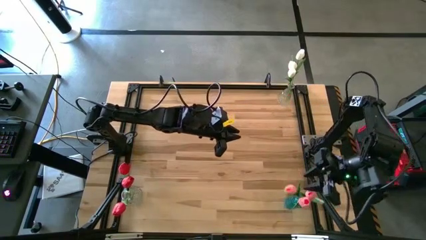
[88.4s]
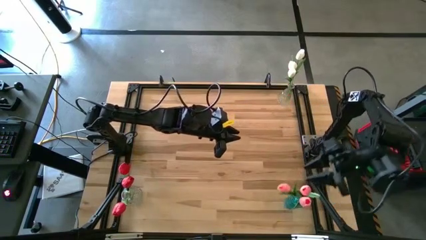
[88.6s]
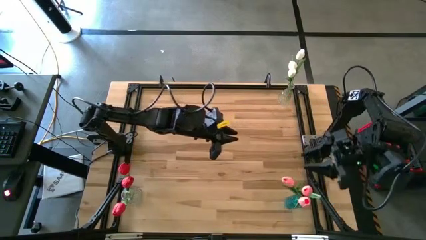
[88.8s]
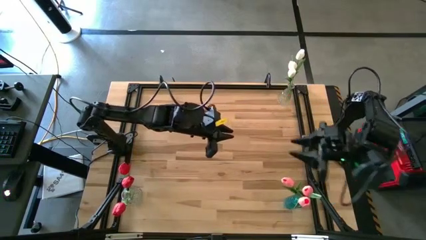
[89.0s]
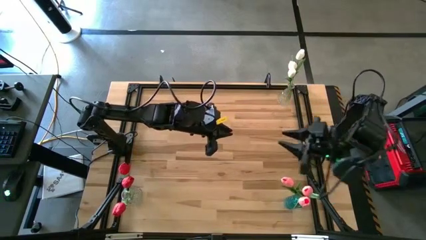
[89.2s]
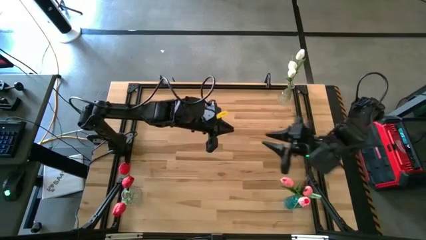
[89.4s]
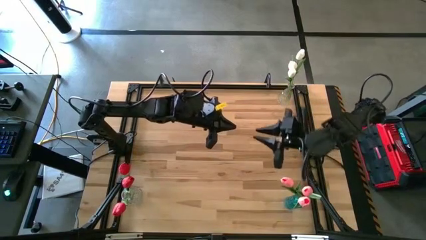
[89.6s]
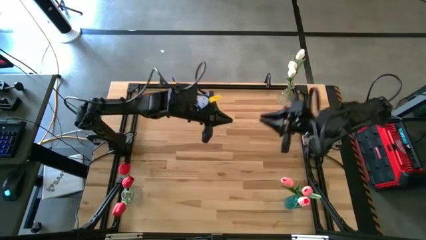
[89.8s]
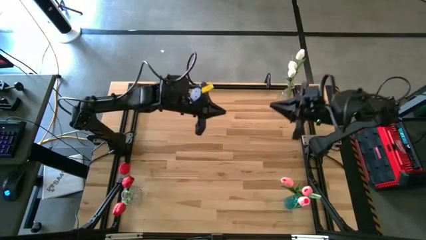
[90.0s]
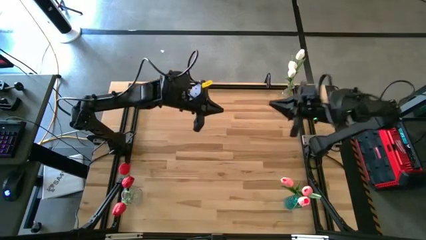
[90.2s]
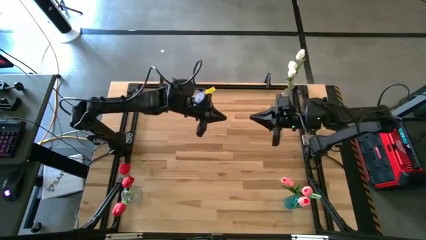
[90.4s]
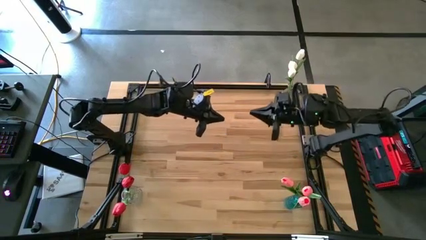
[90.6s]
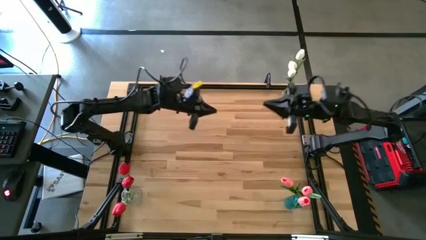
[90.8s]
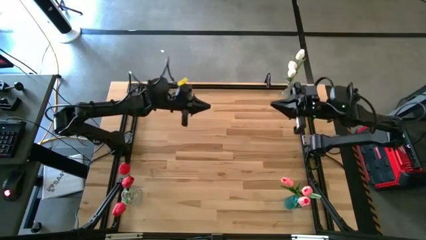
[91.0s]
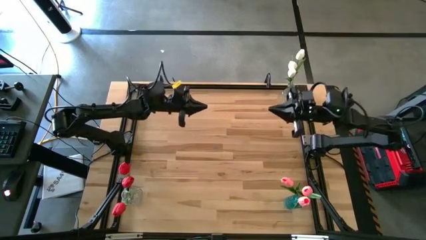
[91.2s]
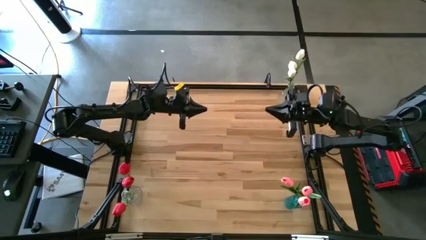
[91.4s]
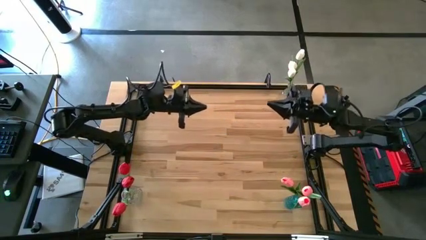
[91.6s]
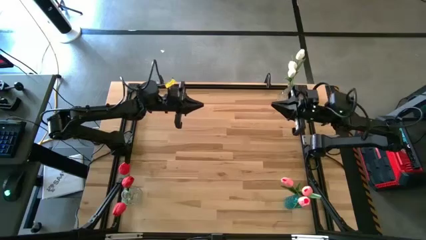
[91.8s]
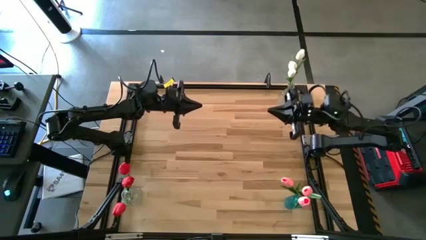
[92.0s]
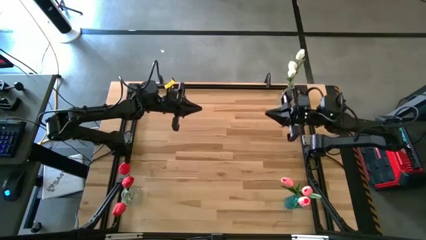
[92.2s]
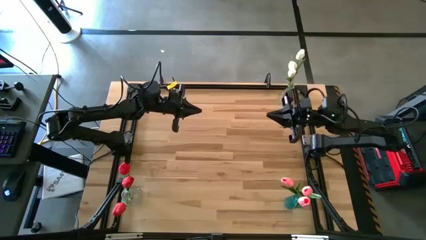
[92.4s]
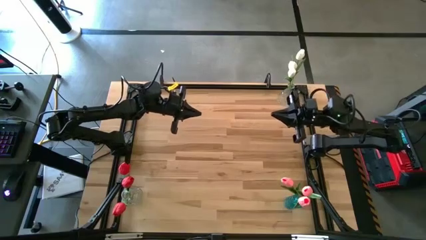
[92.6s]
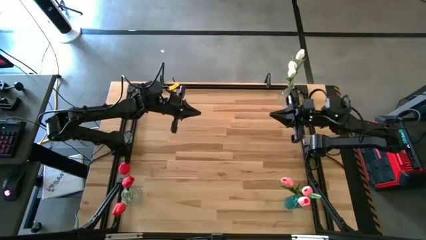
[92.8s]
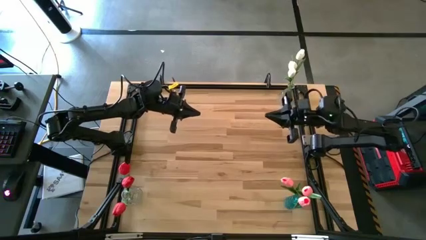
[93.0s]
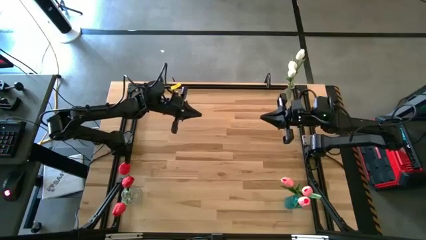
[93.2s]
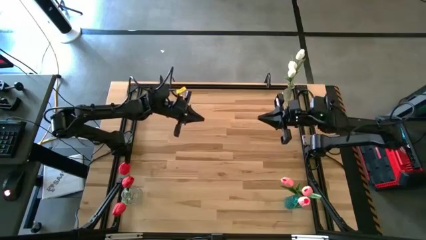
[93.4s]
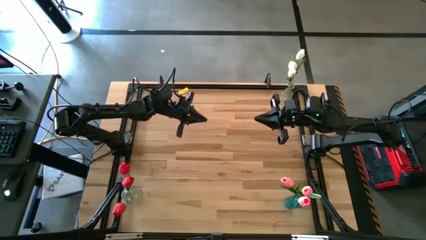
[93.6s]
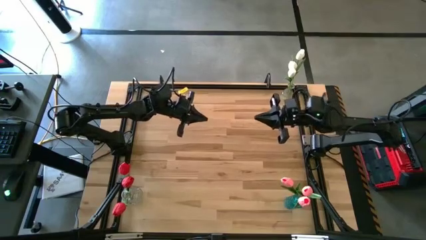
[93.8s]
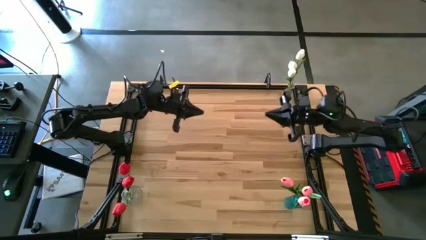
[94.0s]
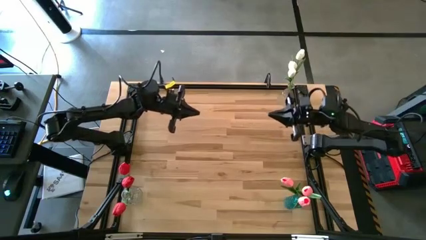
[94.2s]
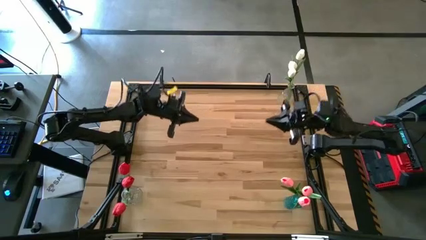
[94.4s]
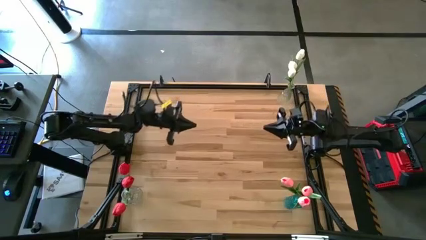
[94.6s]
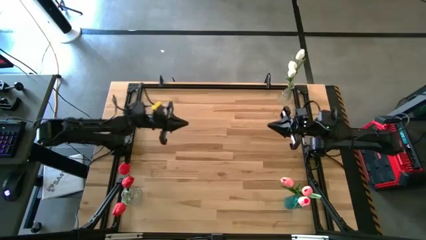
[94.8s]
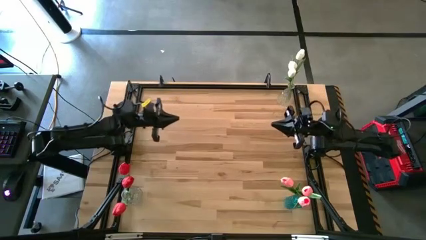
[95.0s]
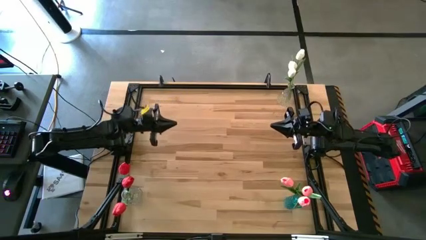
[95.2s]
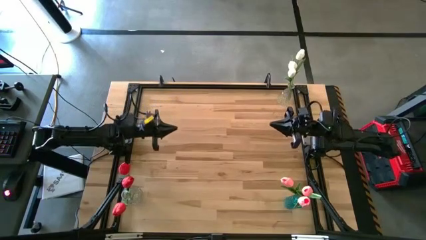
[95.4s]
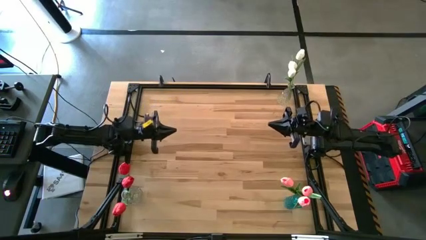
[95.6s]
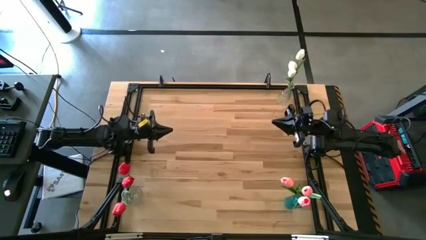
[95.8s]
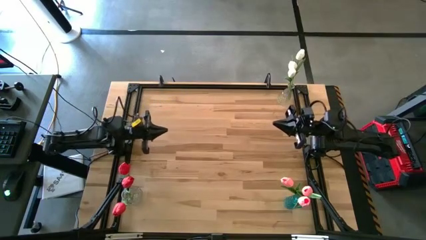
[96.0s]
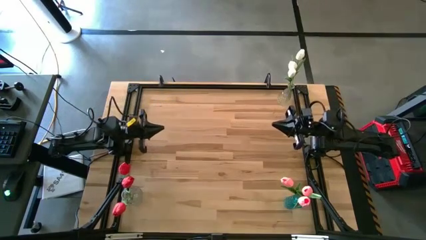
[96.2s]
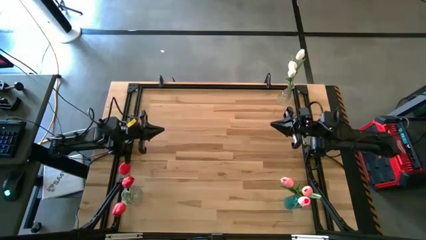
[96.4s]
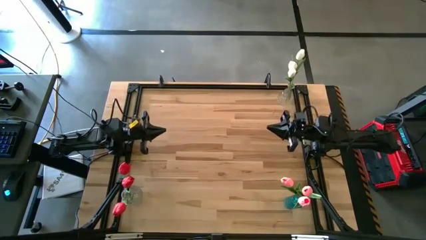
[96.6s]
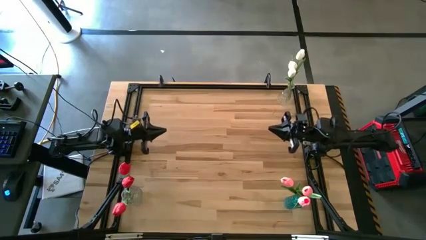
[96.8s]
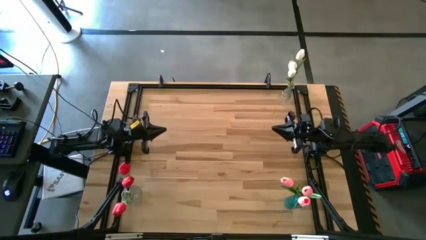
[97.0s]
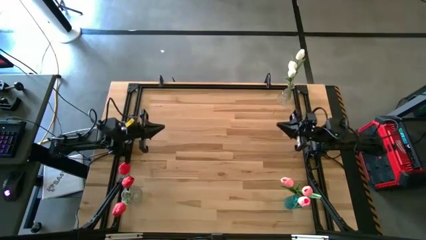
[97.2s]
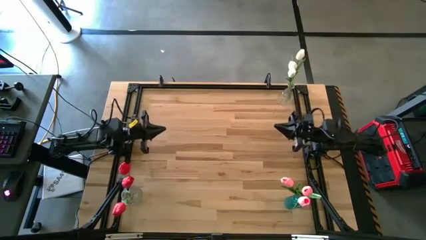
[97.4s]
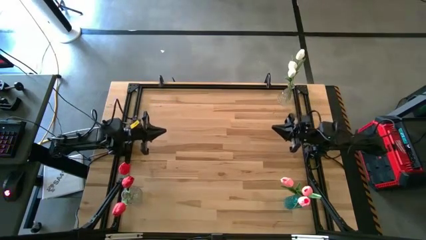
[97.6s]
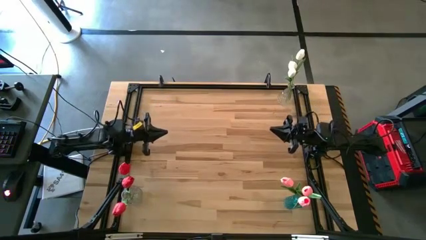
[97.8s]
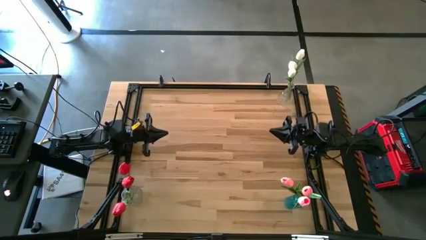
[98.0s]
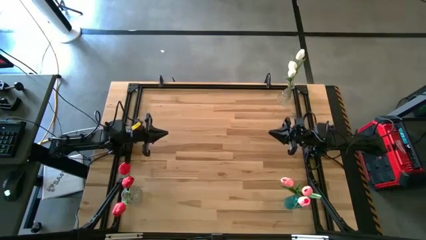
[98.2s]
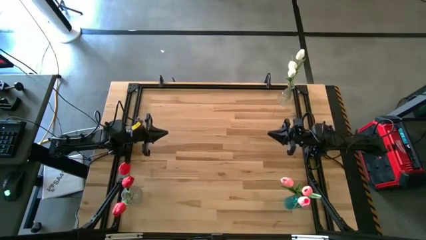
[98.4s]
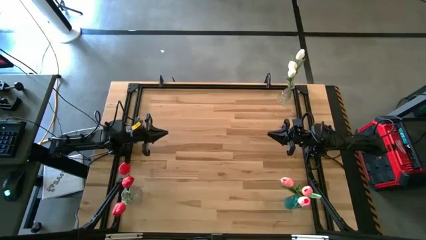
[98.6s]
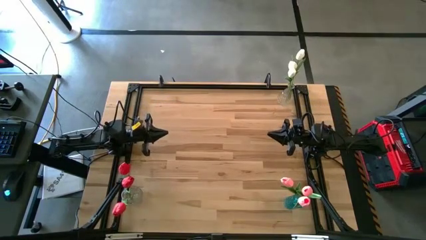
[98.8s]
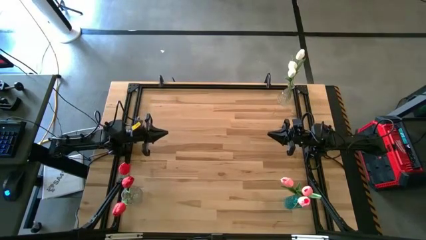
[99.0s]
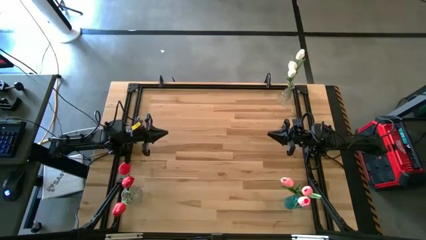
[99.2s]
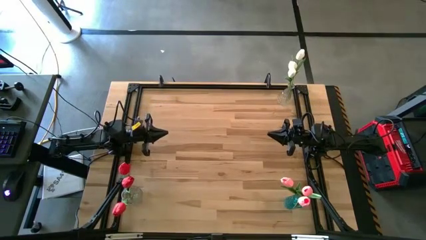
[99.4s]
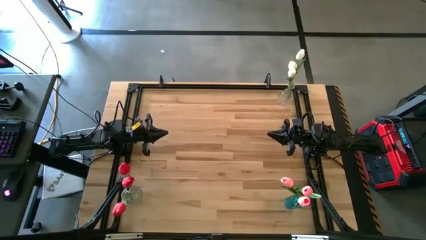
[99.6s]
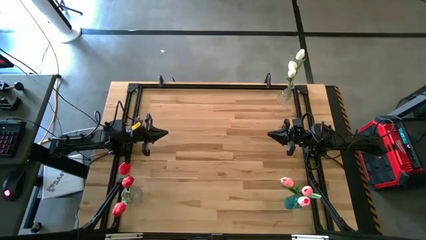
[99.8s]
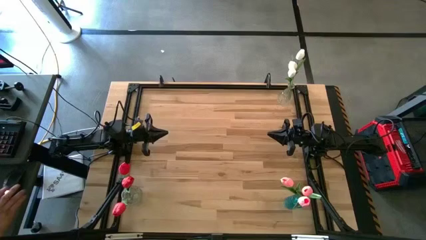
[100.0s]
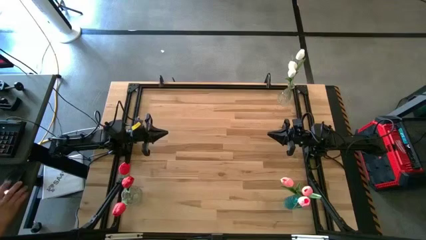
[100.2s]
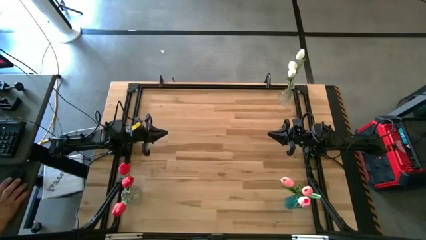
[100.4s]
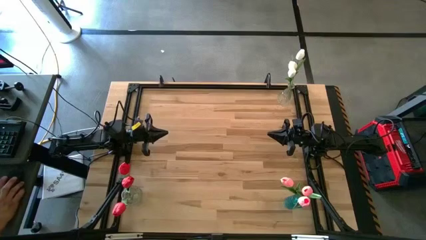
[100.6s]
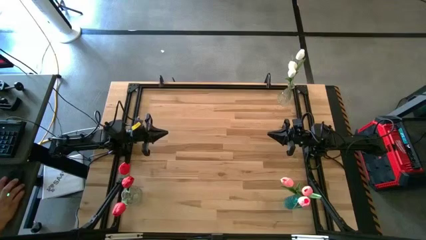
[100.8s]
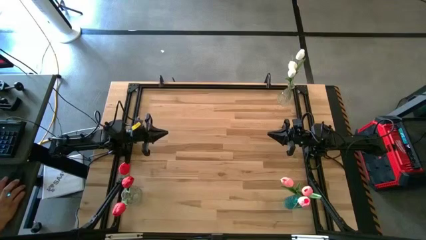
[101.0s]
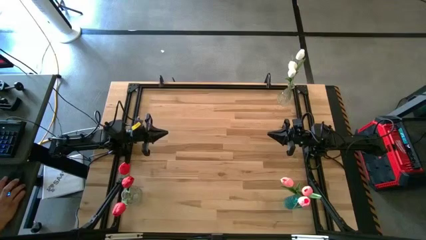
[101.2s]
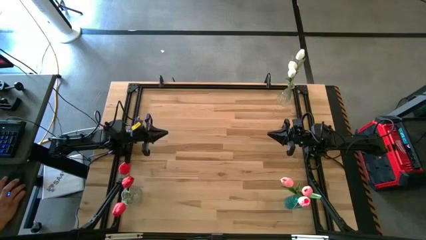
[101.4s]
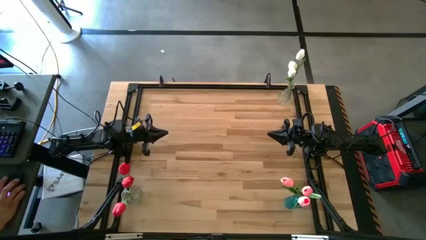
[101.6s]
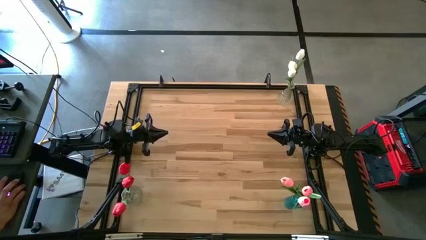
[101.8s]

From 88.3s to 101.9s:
Task: Sort flowers into vase by color
Return to Home Position

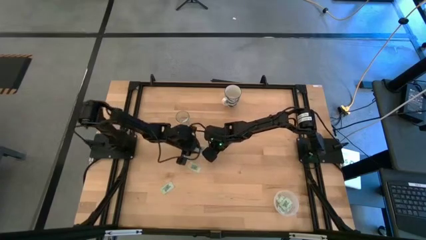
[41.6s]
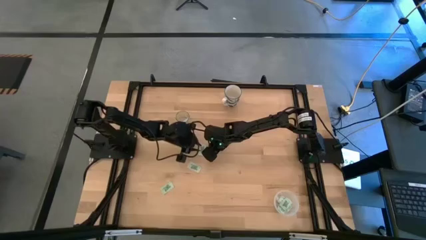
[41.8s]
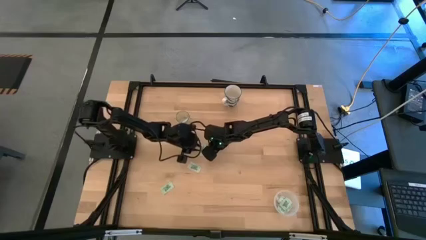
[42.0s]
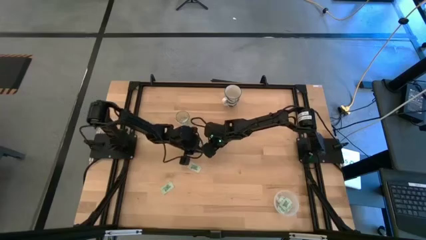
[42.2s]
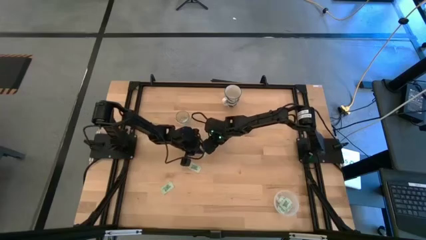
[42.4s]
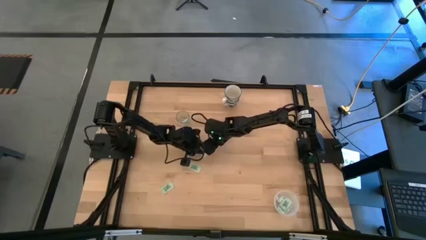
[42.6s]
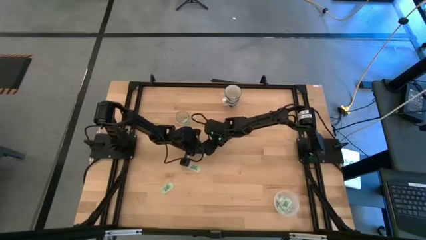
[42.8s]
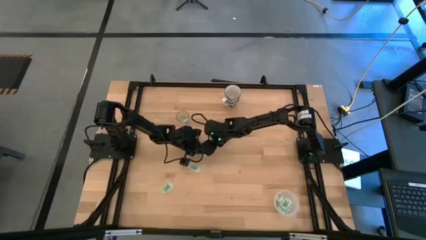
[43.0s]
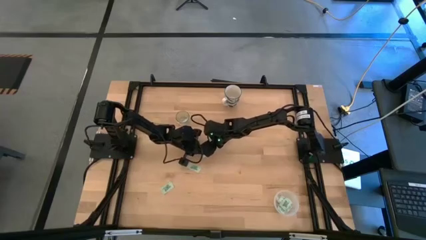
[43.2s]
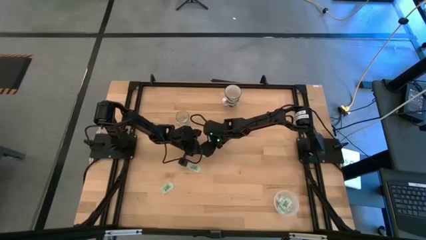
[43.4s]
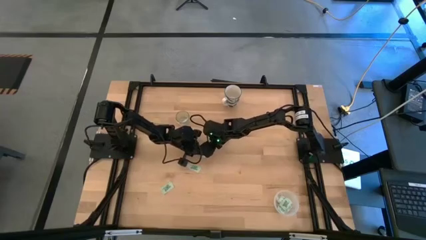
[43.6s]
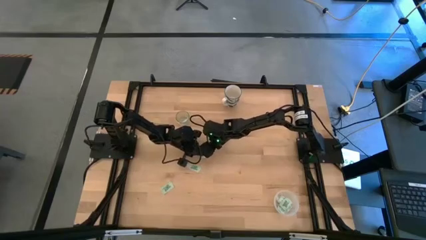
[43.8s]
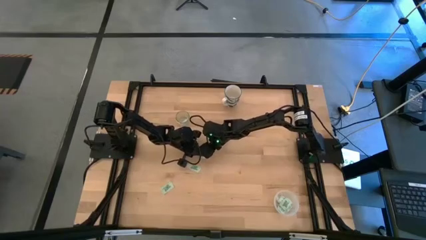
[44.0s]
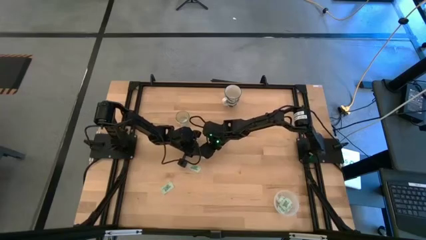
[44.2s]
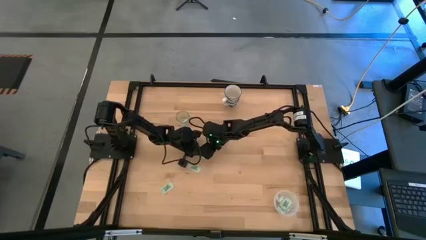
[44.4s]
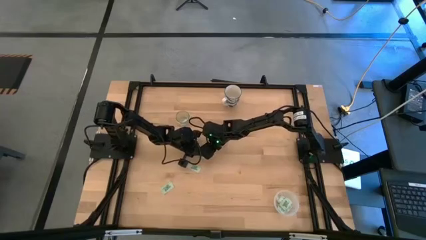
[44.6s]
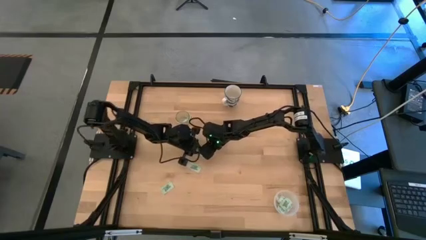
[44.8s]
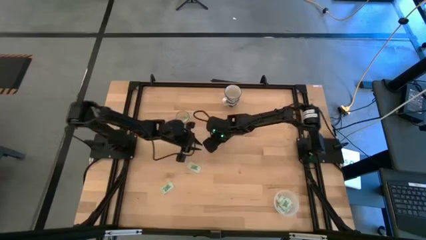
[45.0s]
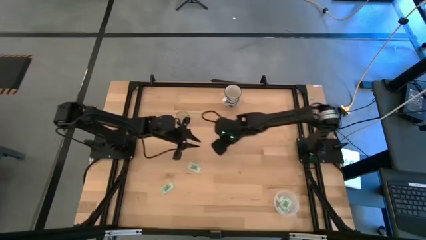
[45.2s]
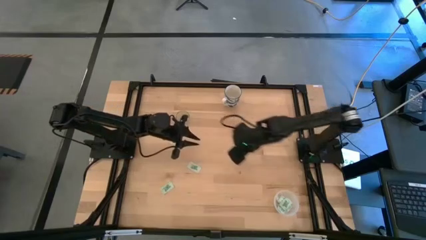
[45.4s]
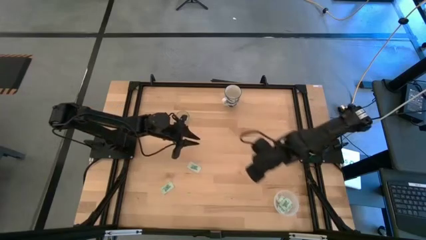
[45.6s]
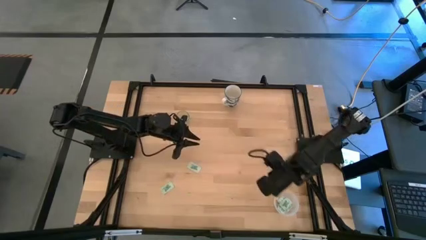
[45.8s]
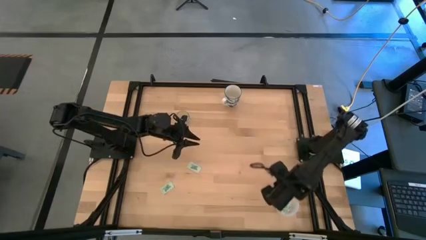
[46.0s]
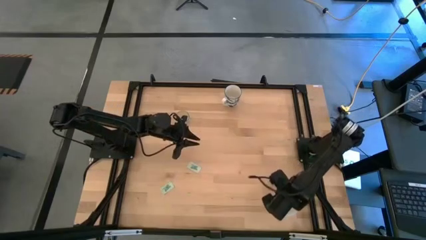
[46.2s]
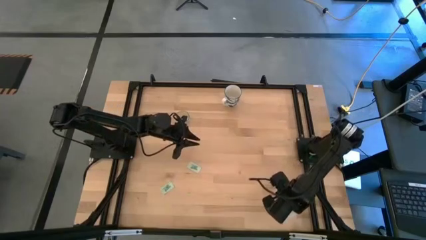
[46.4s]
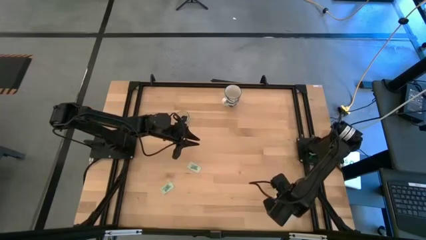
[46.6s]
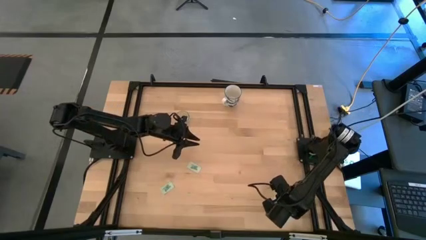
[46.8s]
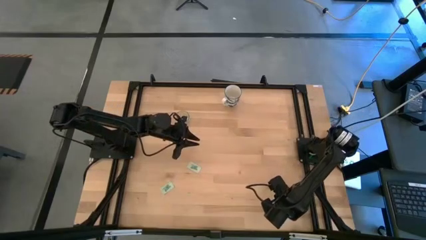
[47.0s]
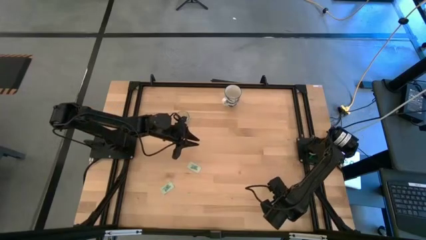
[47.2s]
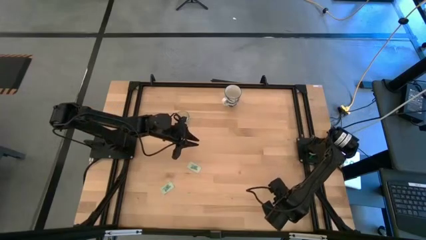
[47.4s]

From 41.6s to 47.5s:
Task: Pick and place Stevia / Truvia into bins
Put the green stevia packet into the transparent container
